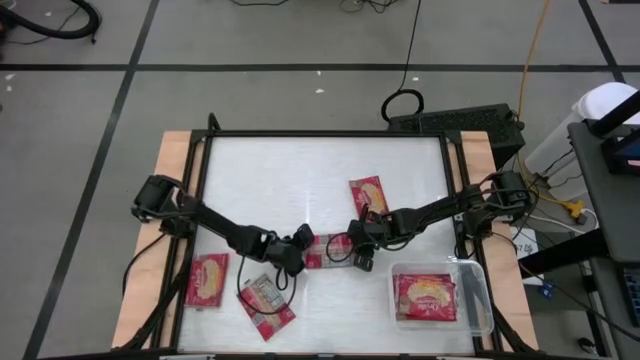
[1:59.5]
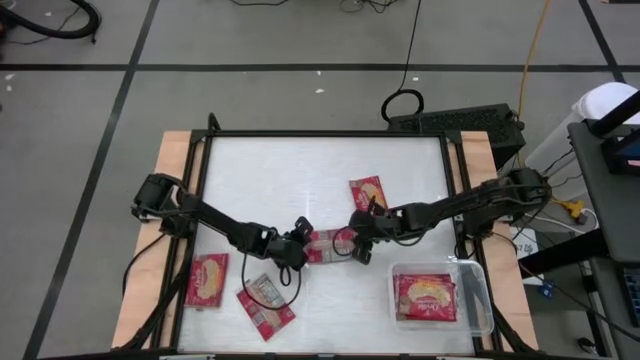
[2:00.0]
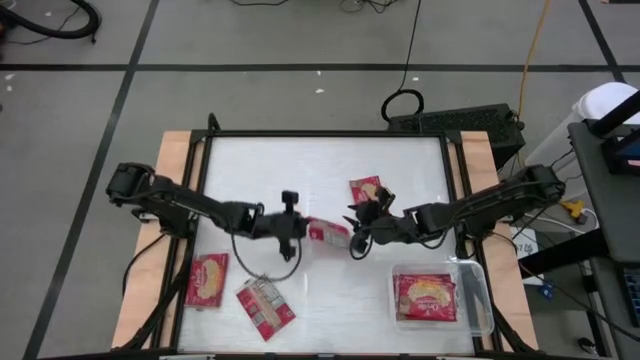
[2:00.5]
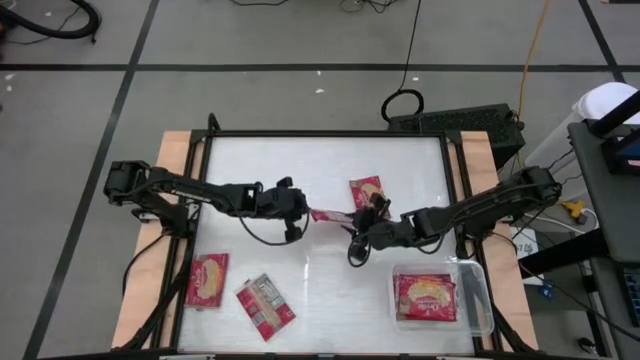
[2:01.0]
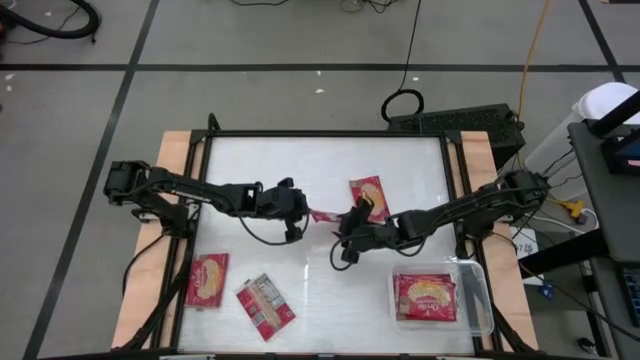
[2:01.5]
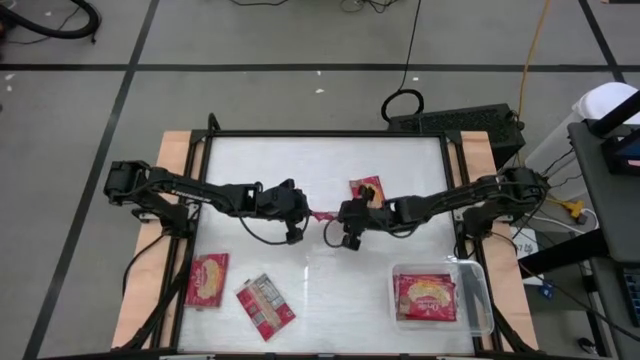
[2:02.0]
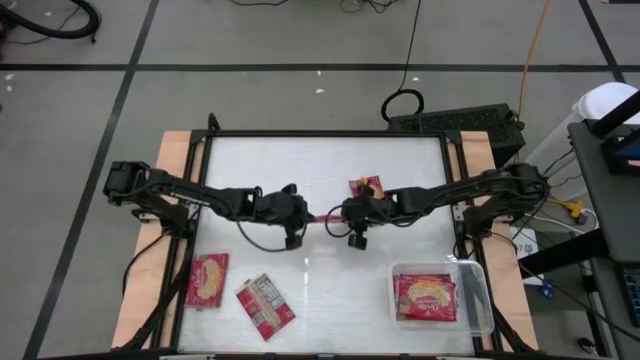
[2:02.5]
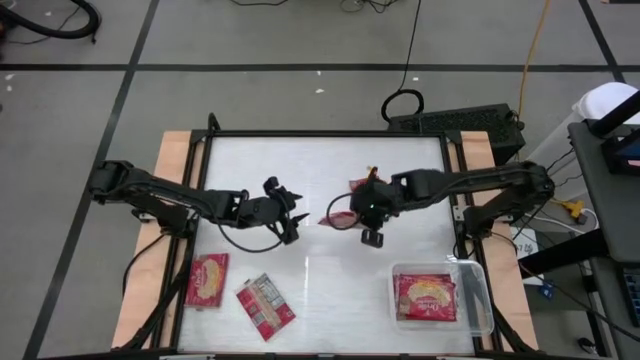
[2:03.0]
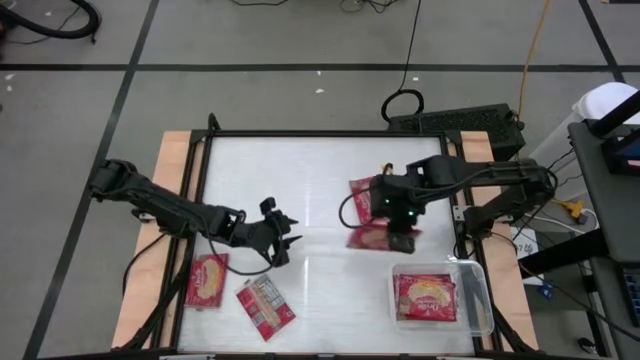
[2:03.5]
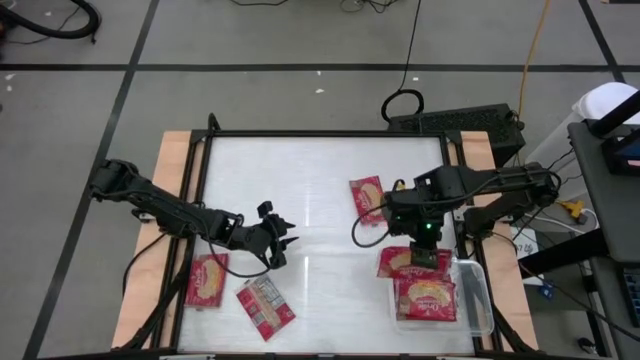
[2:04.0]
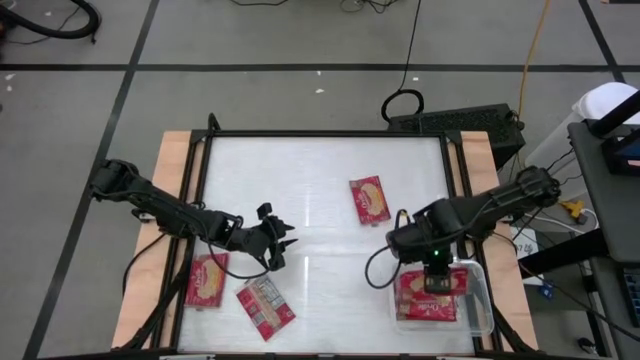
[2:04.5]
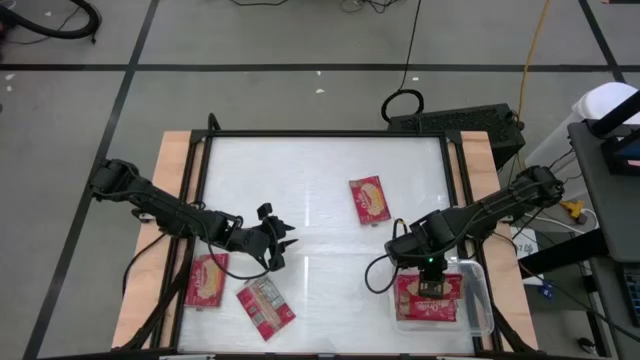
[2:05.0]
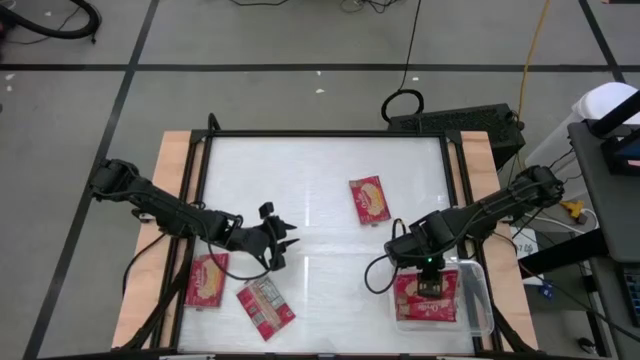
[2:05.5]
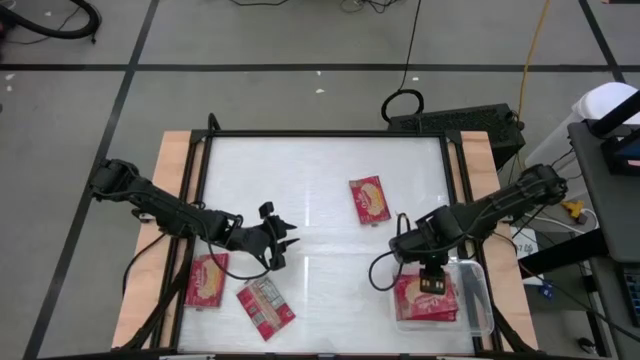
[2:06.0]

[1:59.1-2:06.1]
Task: Sort popcorn bags into baskets
Put the red popcorn pack into the transparent bin

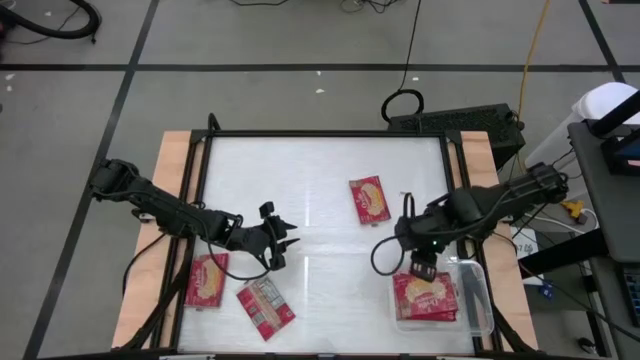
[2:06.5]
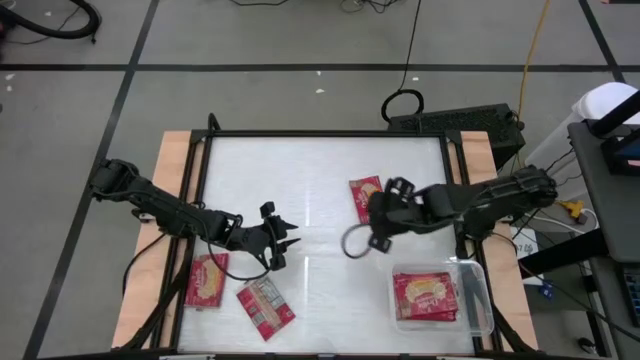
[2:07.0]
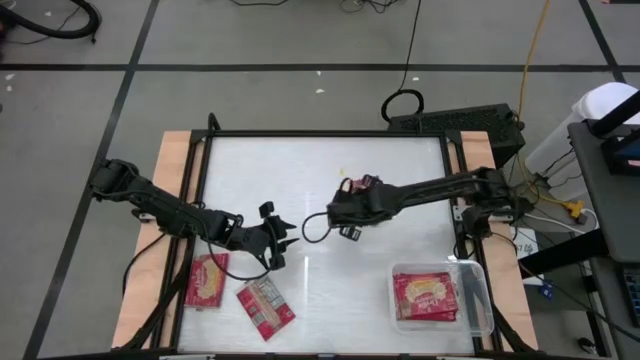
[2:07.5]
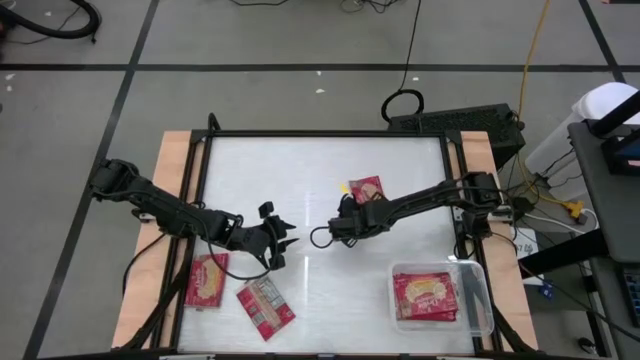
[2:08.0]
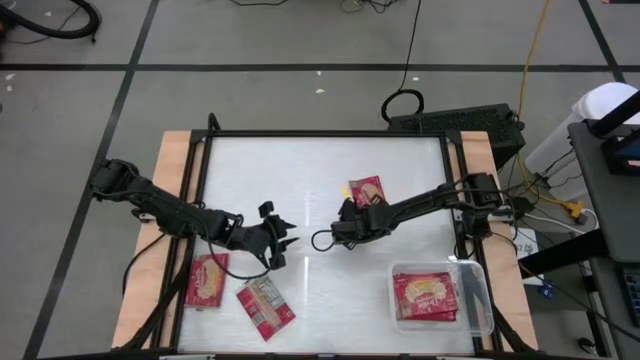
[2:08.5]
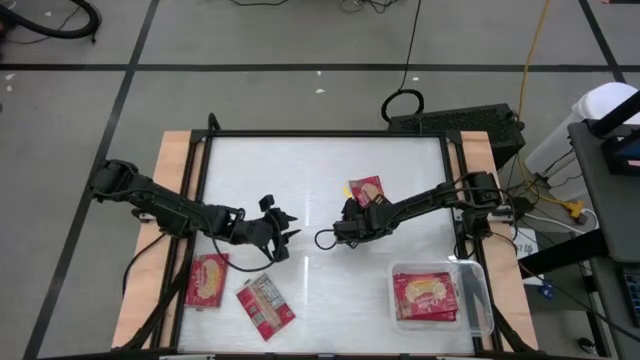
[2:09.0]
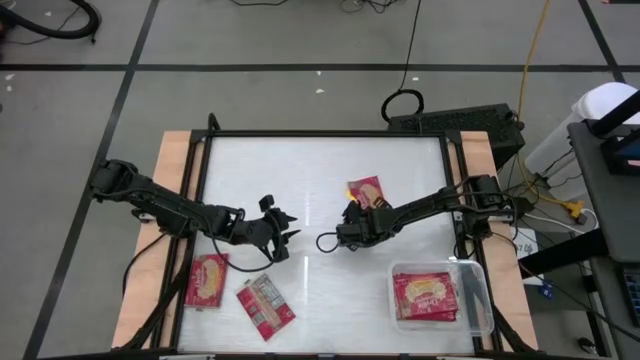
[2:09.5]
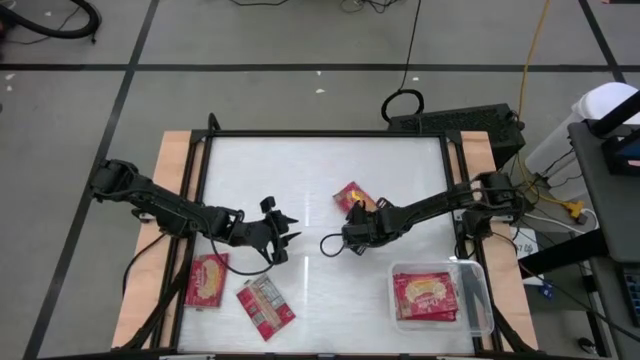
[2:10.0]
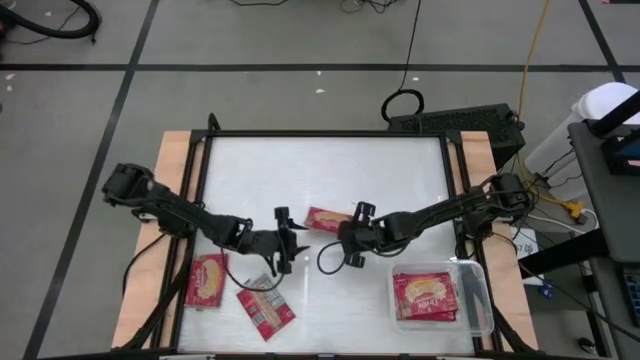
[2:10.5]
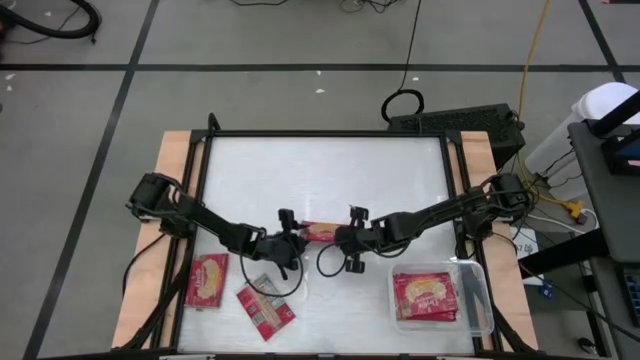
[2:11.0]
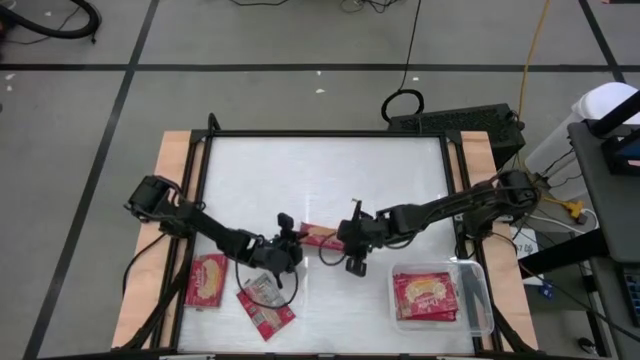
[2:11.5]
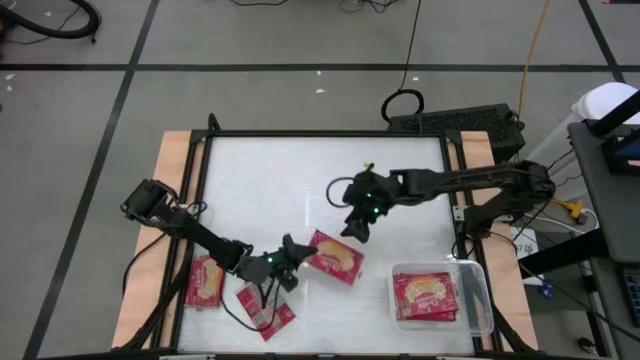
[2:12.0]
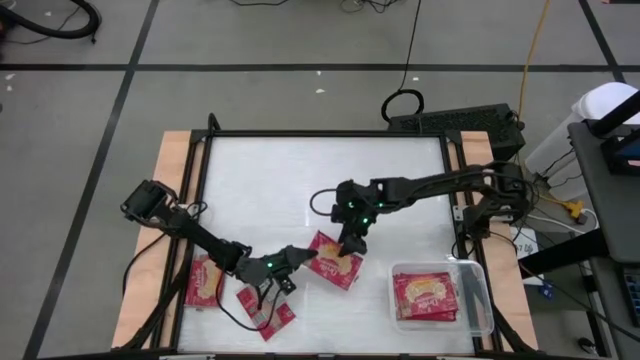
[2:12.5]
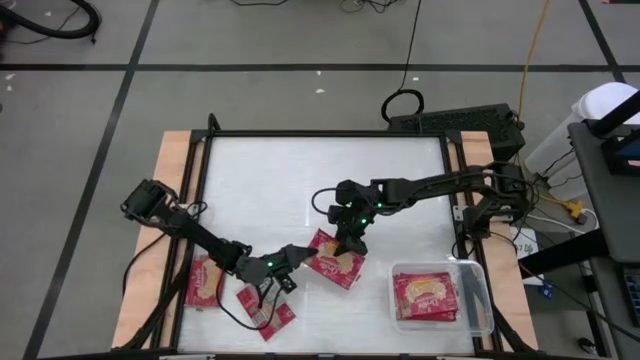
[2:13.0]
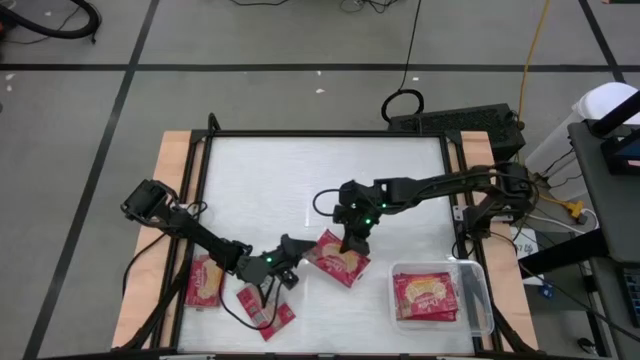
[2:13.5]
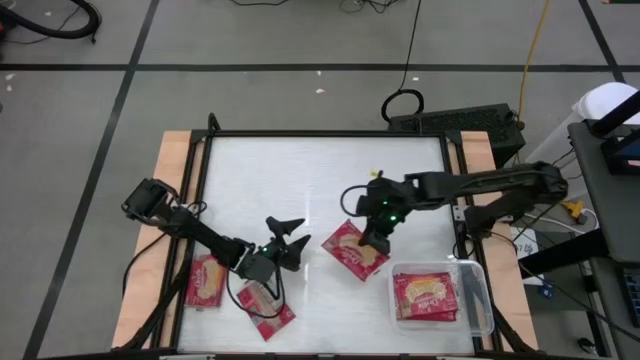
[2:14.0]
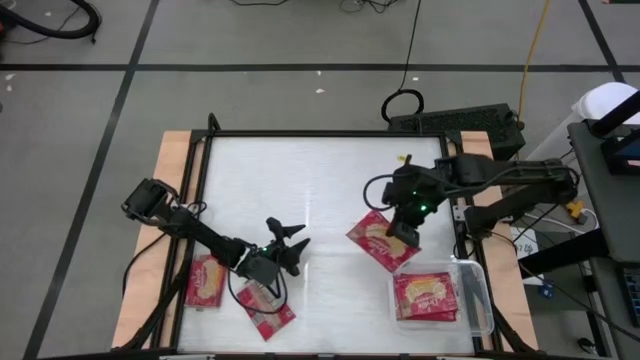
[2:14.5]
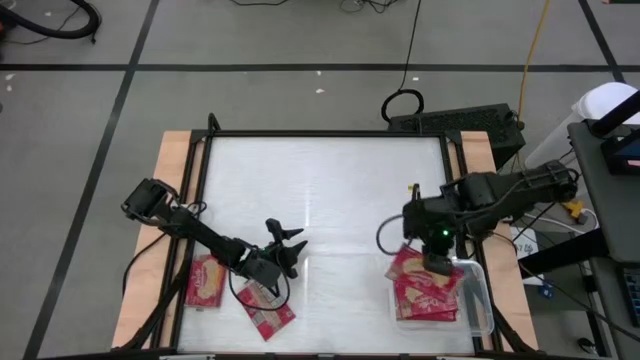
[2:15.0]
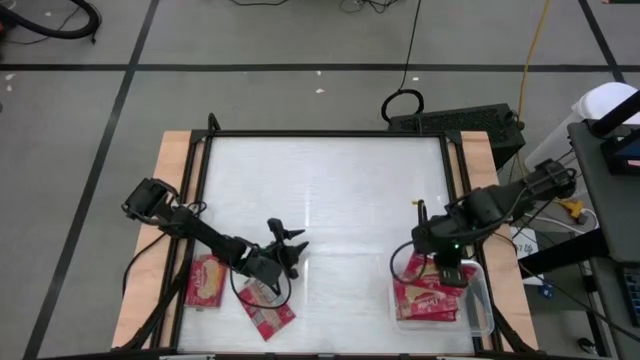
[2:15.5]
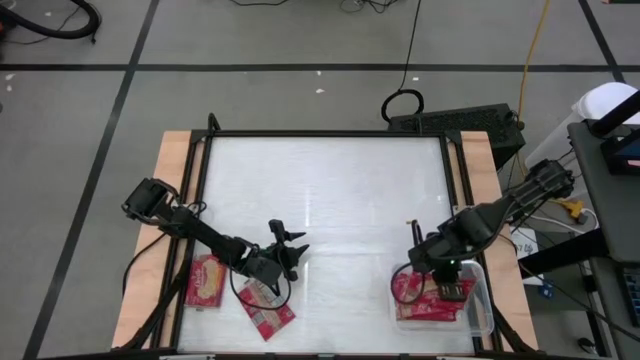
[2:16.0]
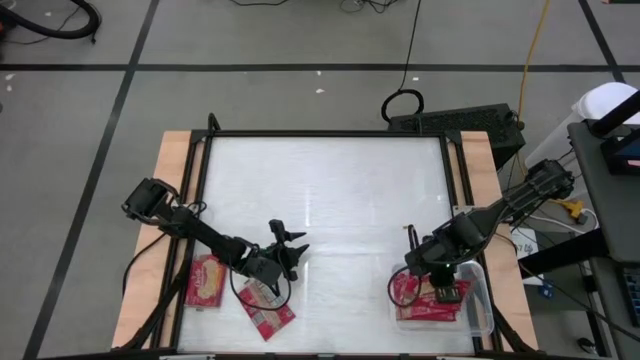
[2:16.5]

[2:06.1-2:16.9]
Put the red popcorn pack into the transparent bin

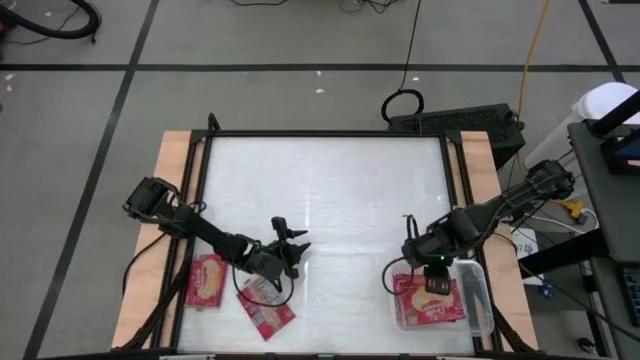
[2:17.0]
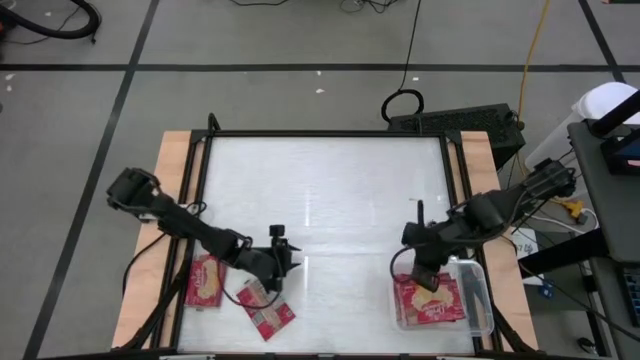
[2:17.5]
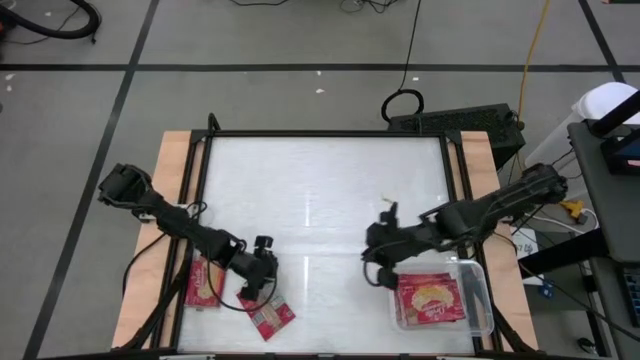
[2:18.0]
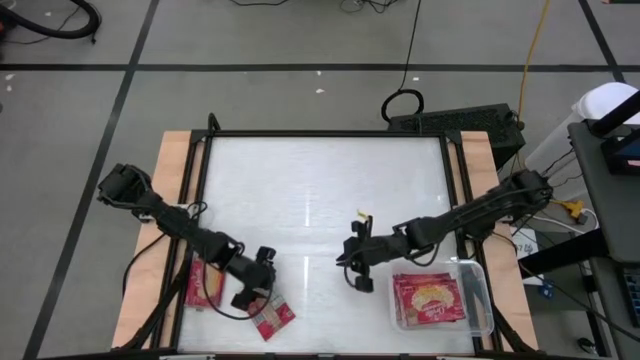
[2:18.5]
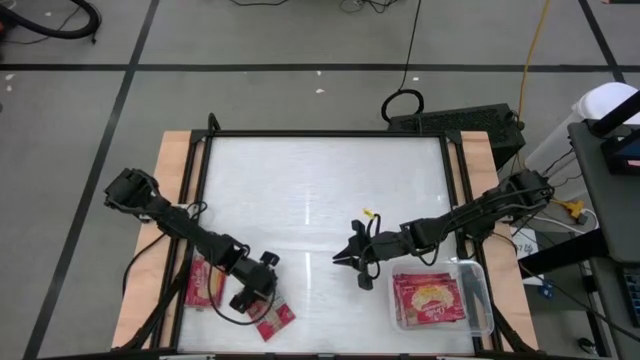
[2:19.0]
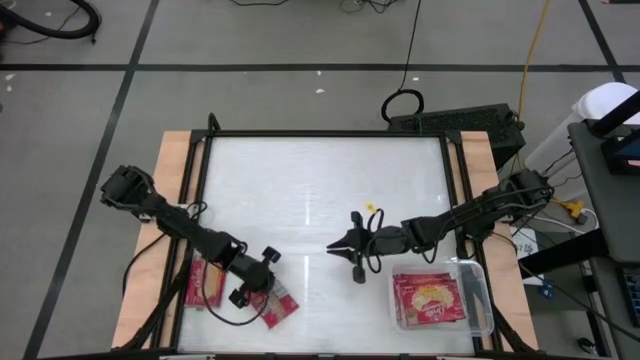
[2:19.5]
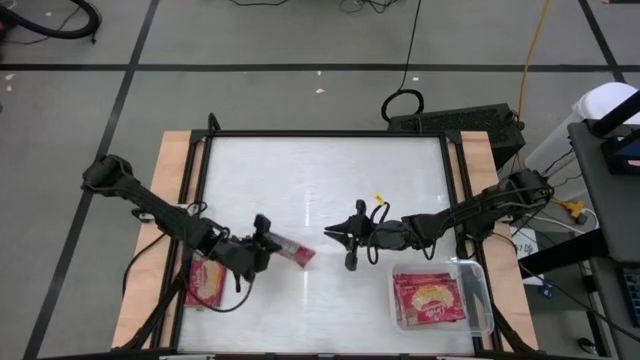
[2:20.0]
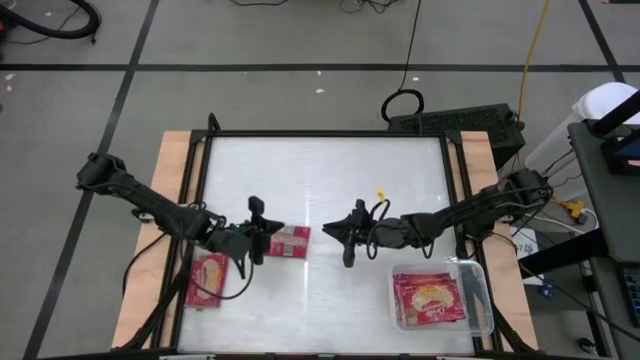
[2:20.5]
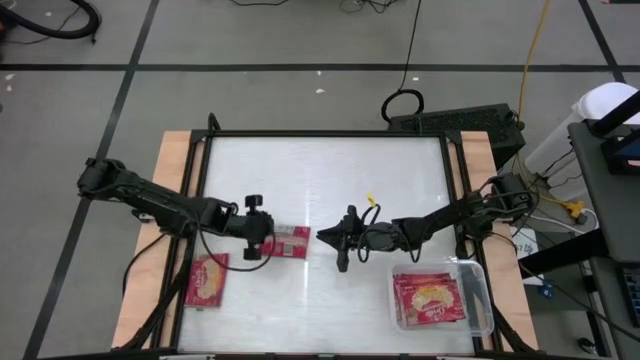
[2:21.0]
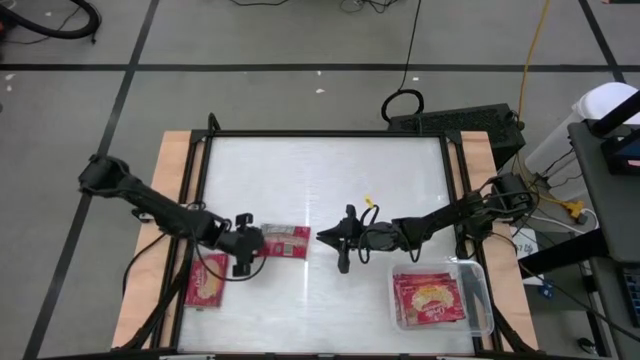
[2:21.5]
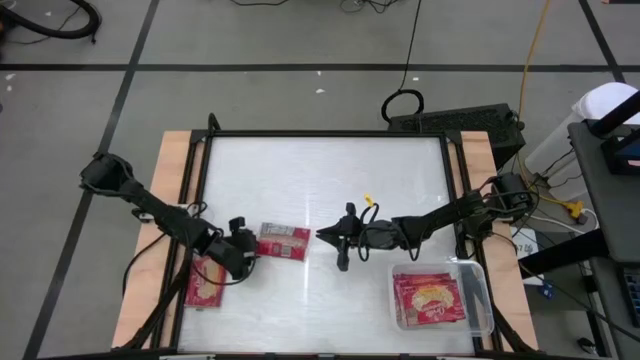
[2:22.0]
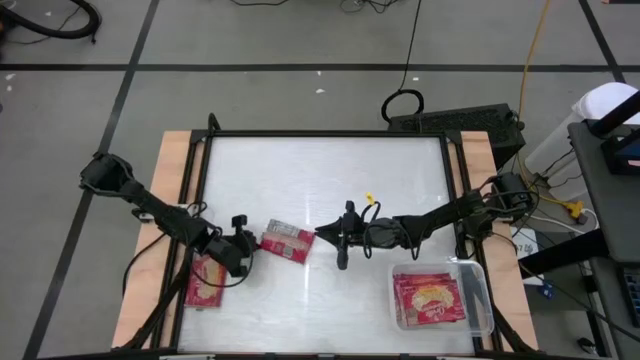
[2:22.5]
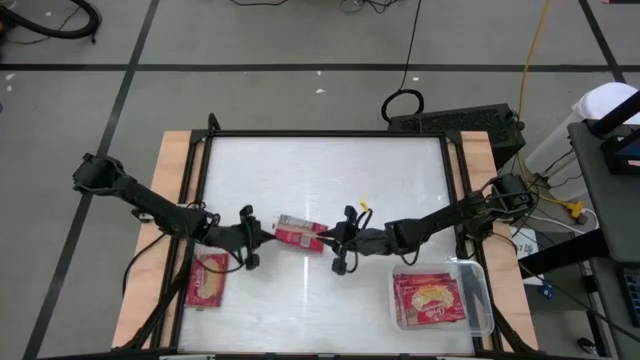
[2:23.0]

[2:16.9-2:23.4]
Put the red popcorn pack into the transparent bin
